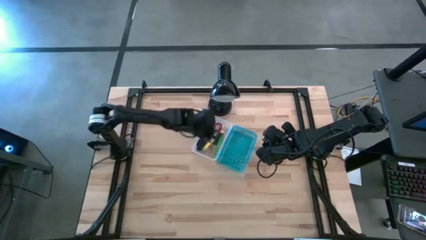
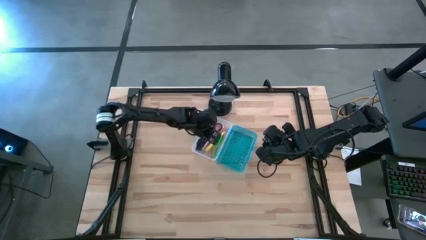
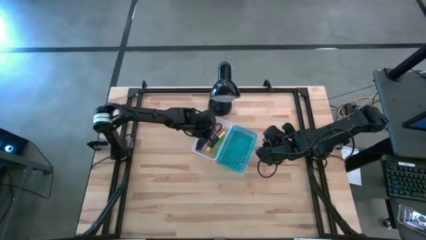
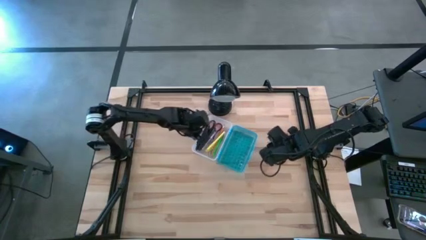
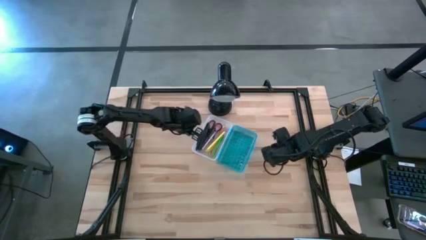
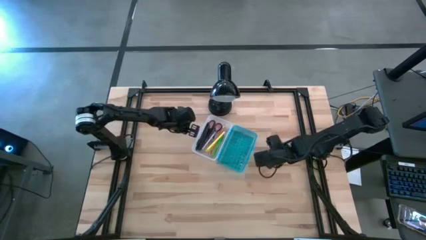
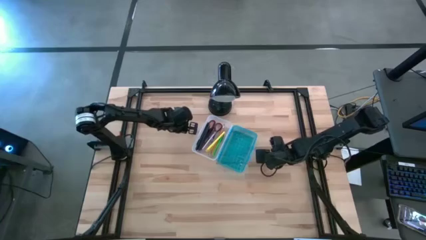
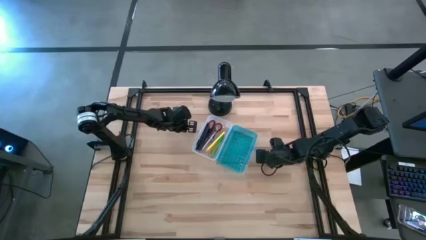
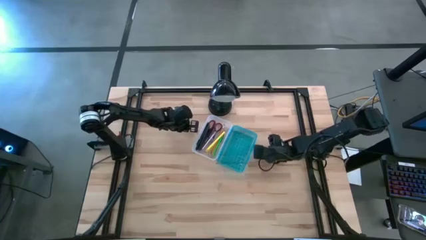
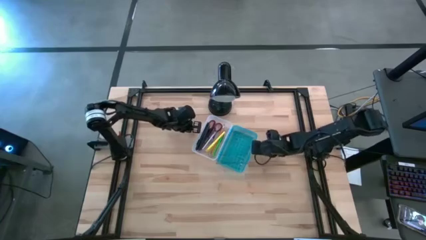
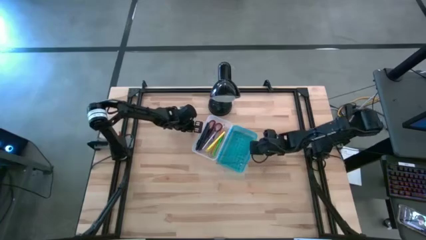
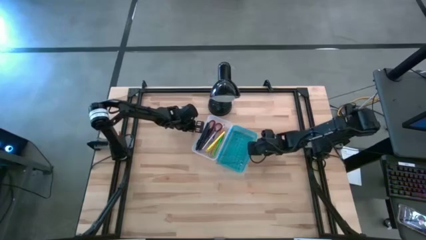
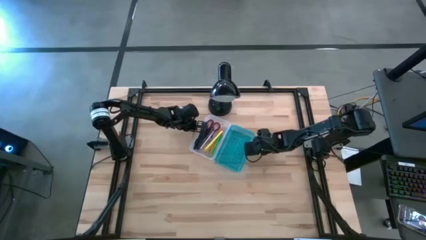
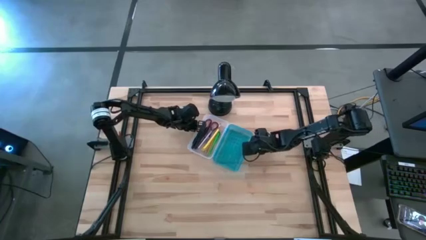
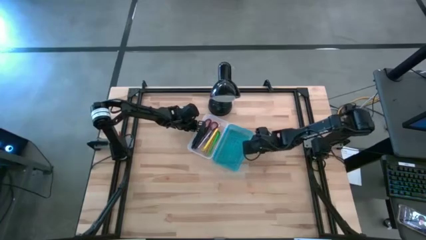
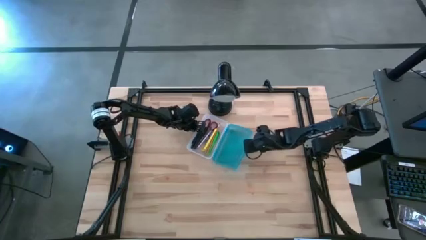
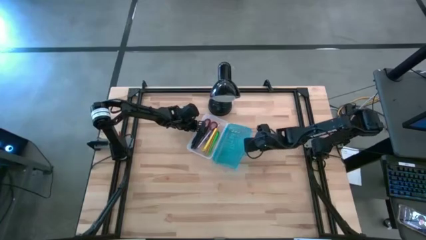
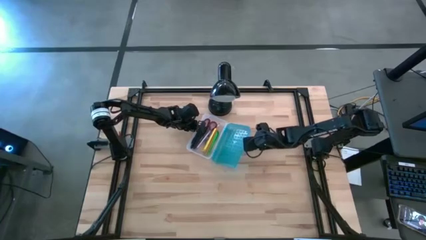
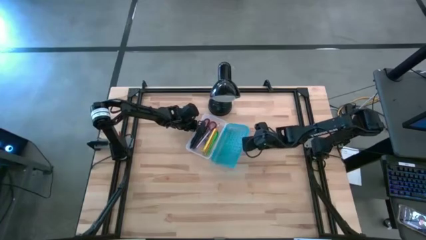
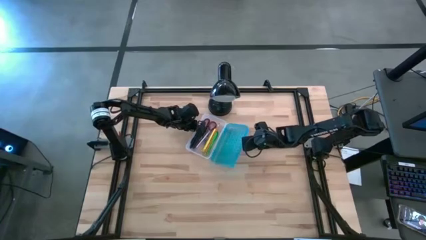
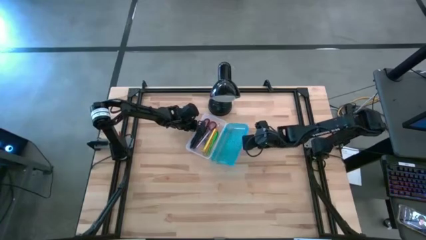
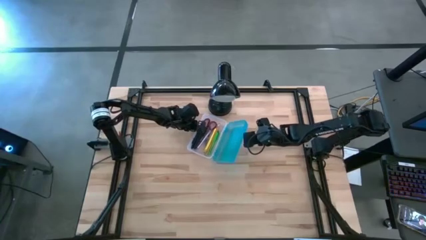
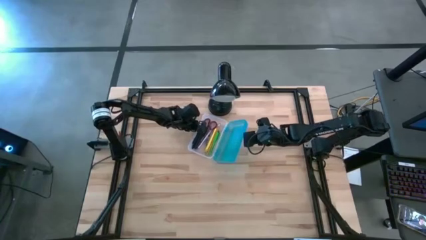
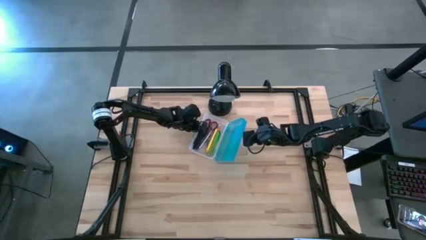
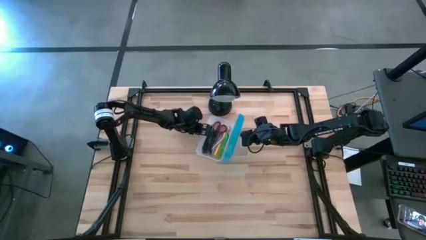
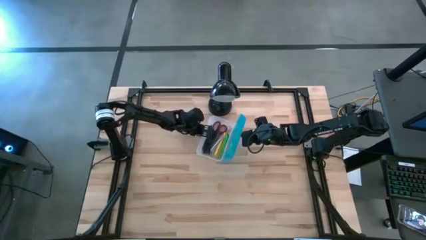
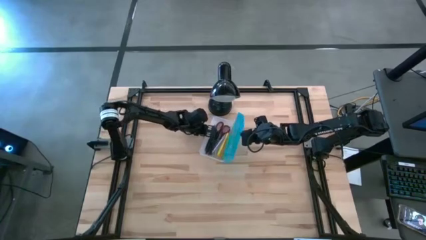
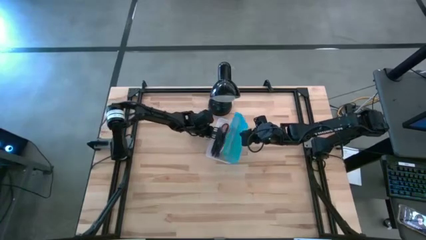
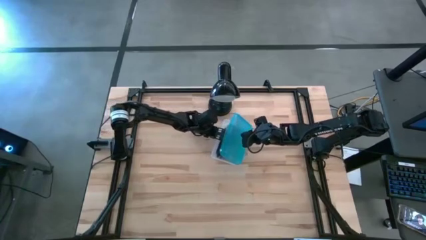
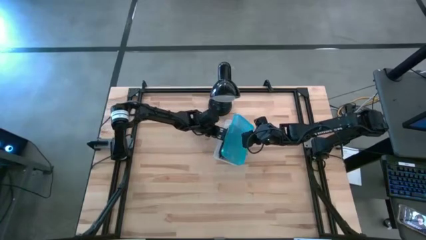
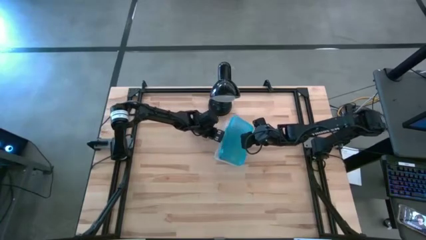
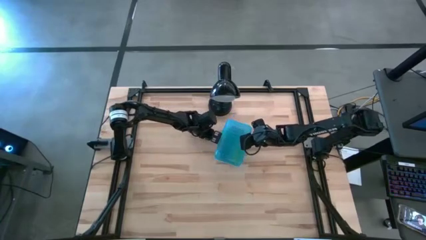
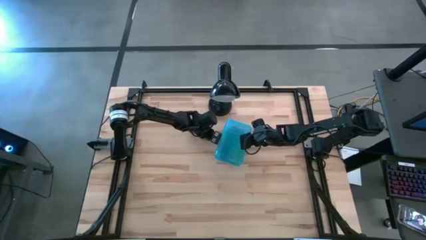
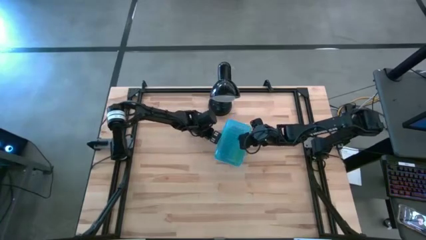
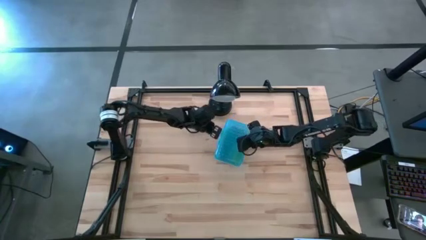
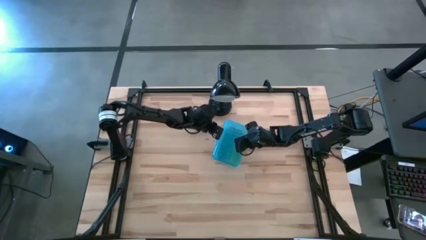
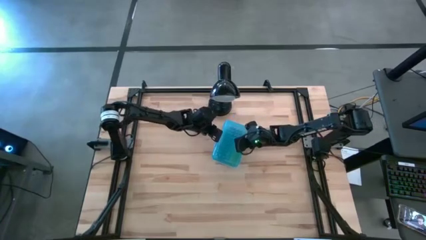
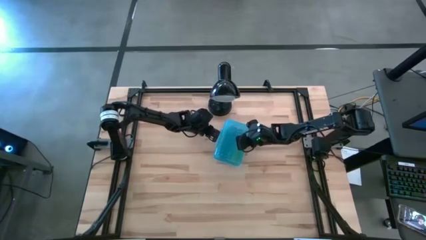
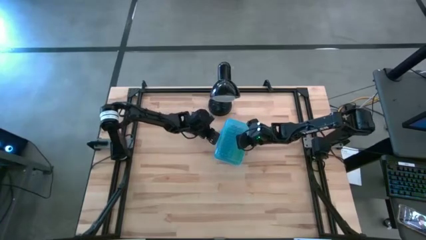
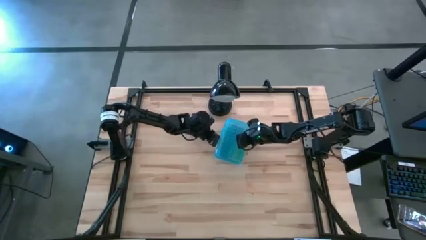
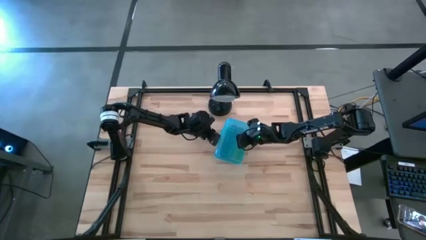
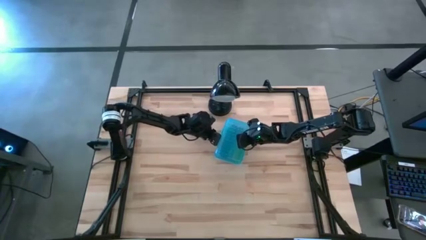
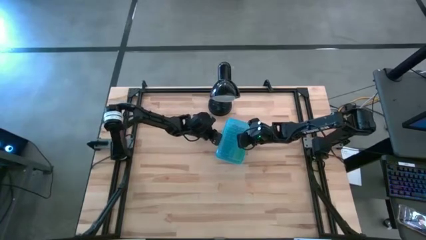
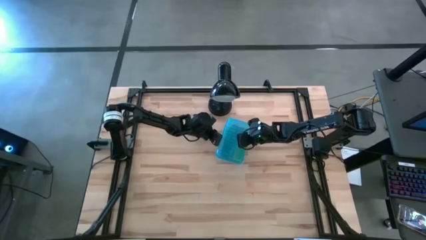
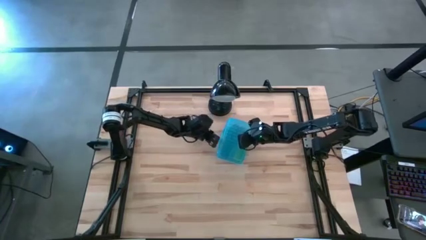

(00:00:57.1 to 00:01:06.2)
Task: Pick & place school supplies into a supply box
Close the supply box

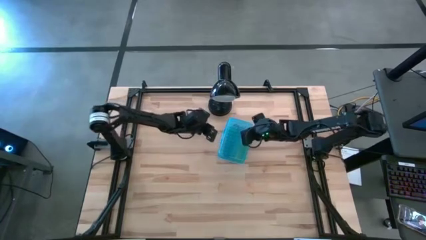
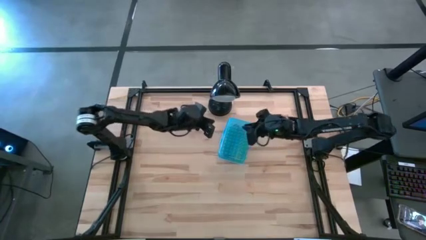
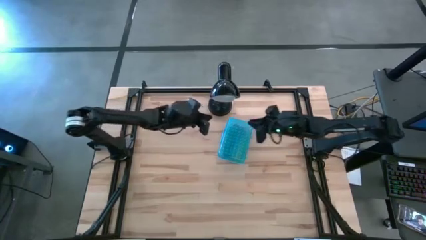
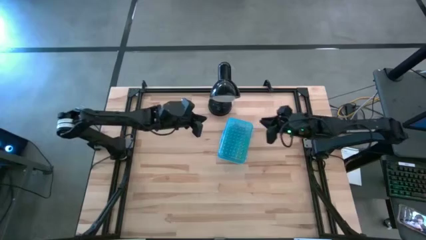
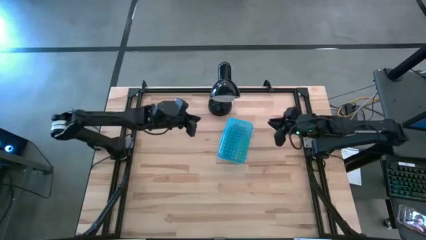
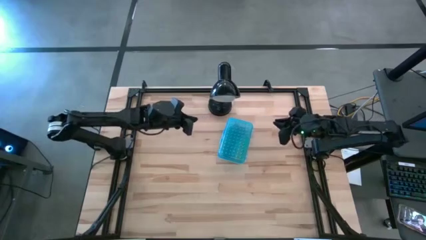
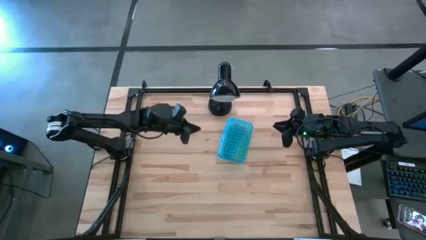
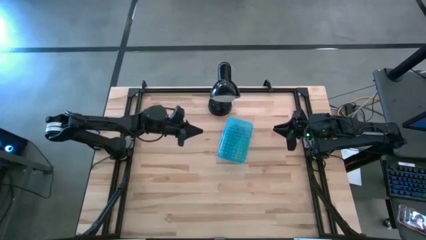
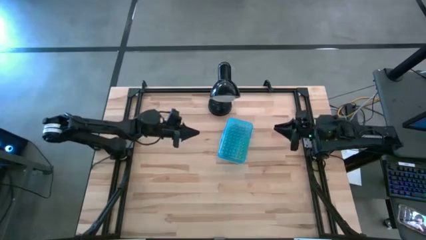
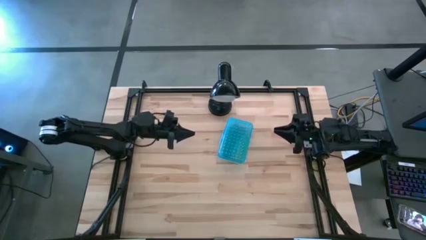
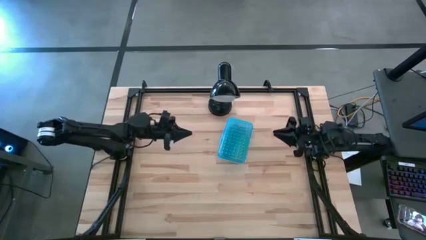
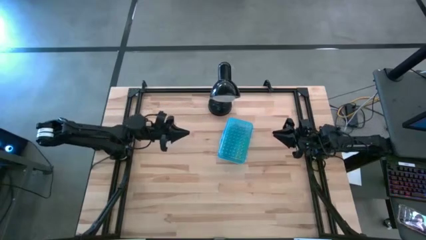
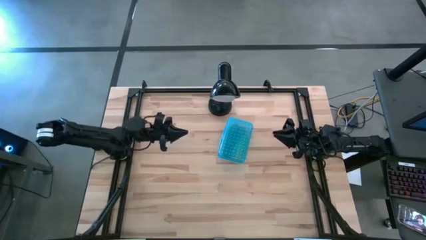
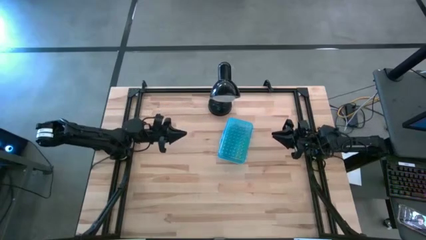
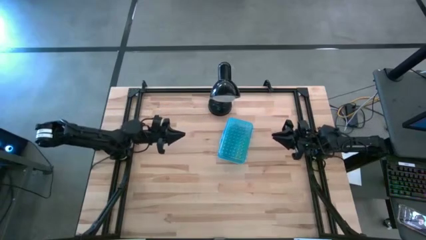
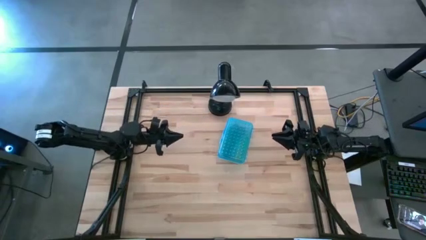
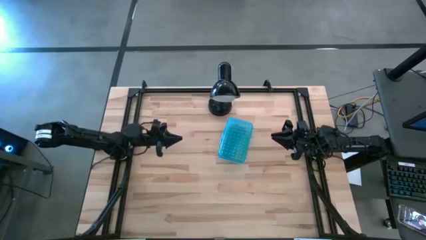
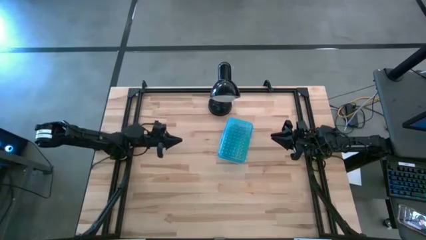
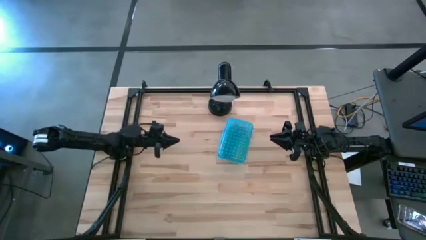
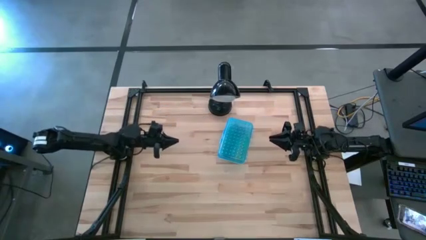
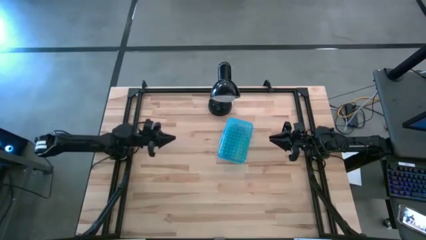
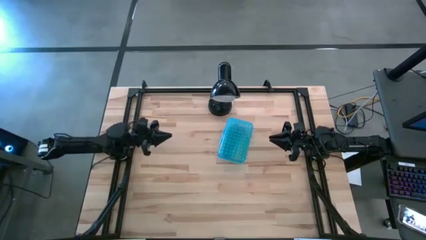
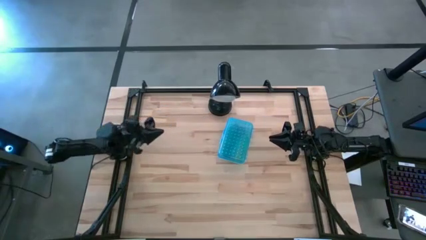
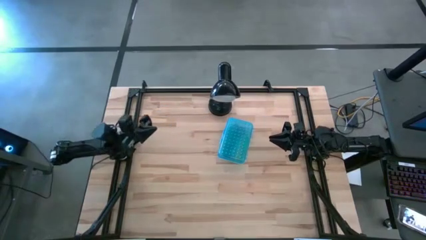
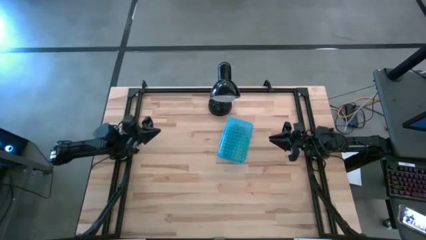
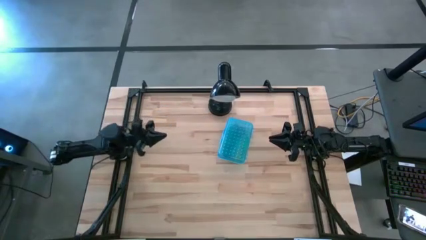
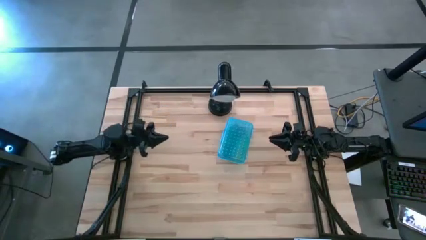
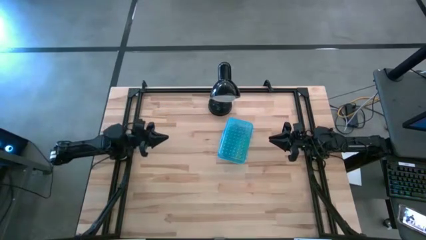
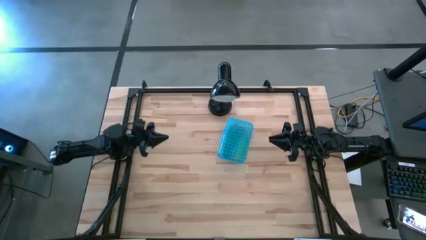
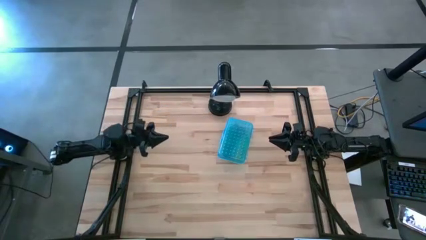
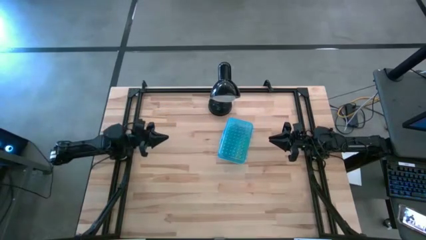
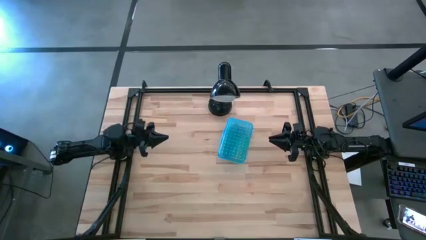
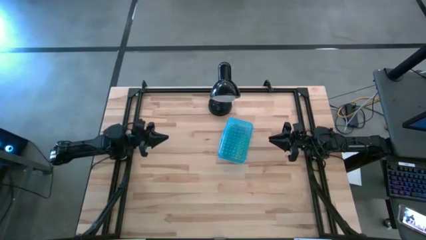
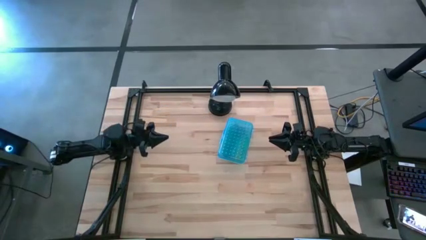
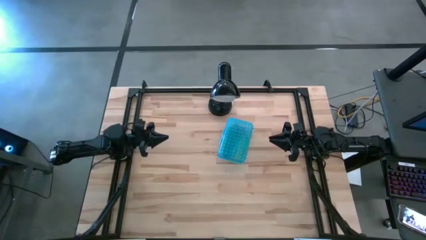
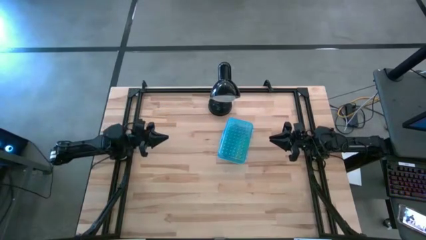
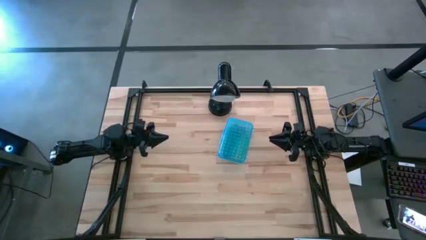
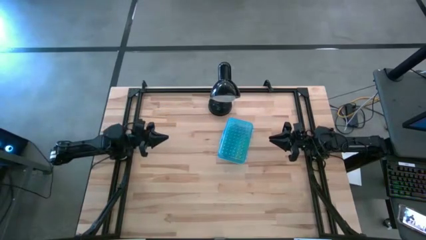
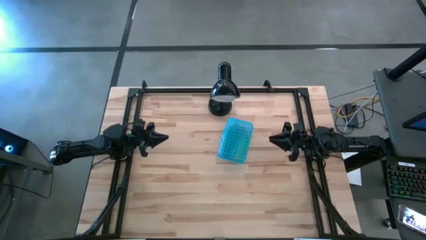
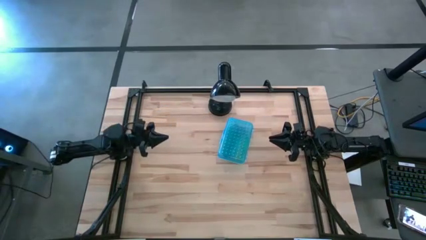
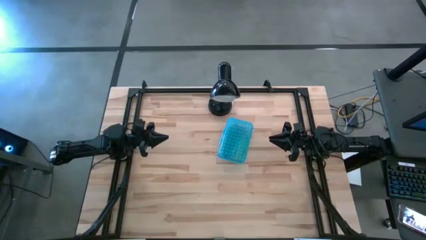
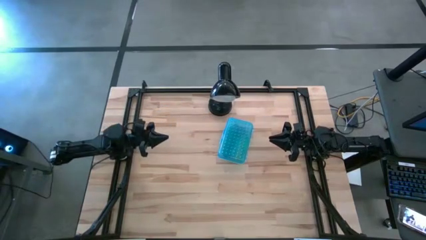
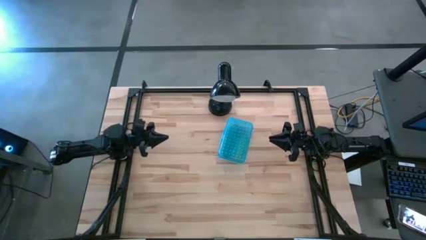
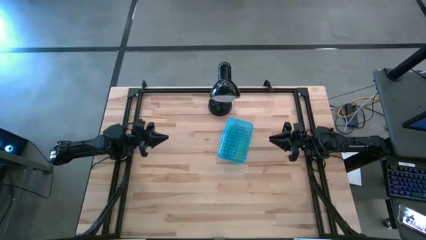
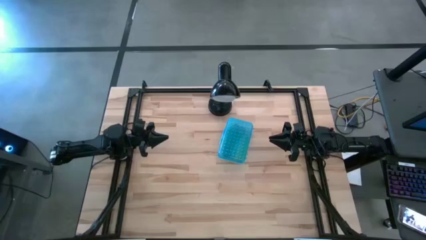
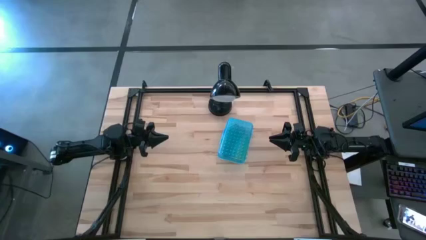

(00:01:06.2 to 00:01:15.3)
Return to Home Position
